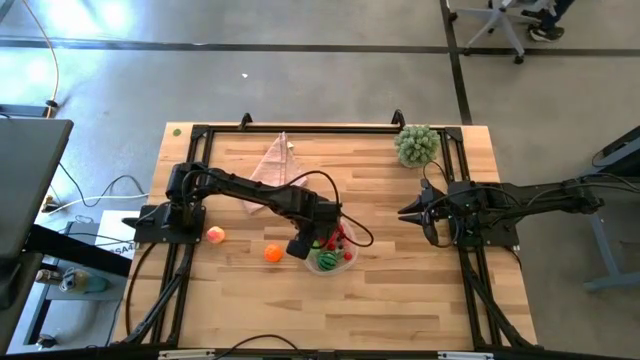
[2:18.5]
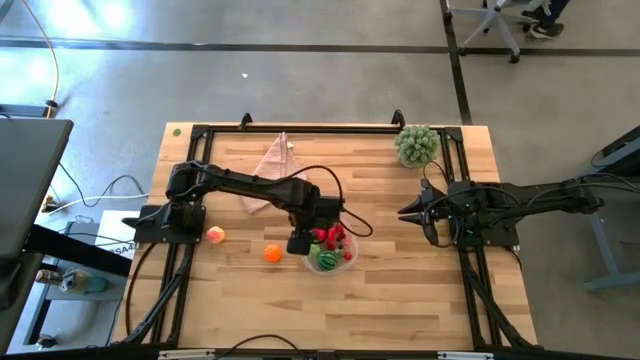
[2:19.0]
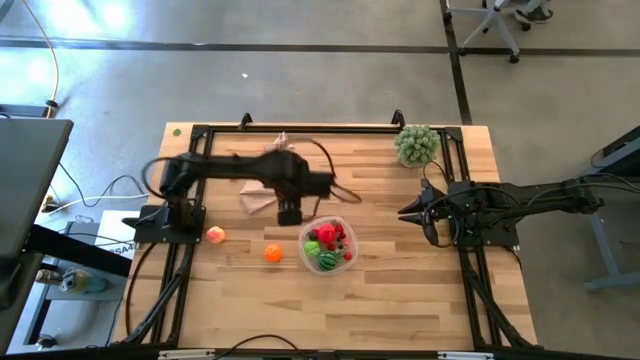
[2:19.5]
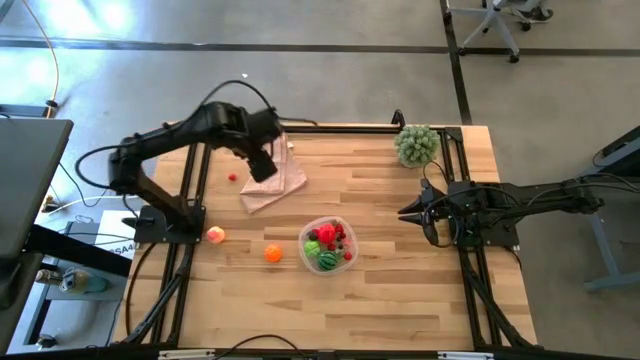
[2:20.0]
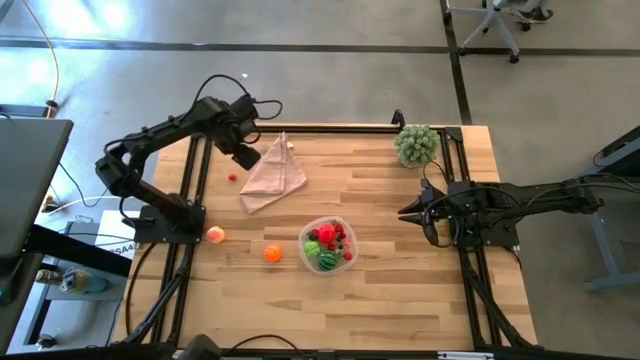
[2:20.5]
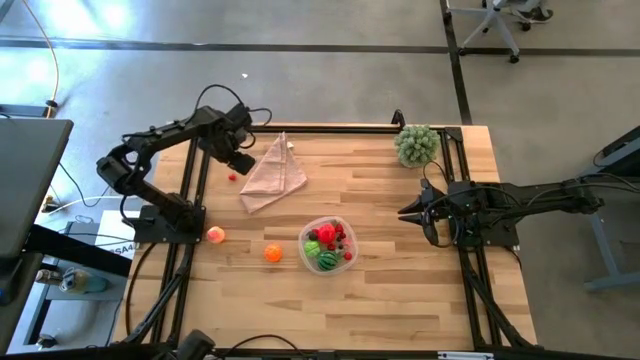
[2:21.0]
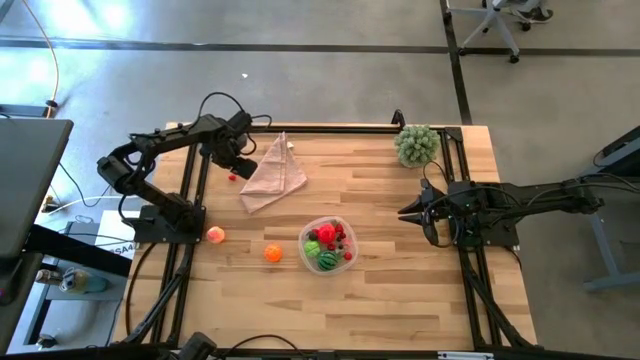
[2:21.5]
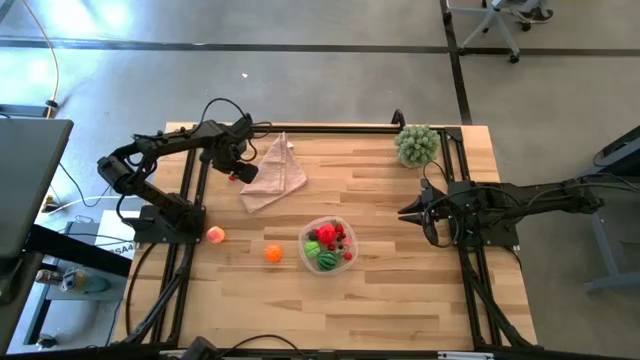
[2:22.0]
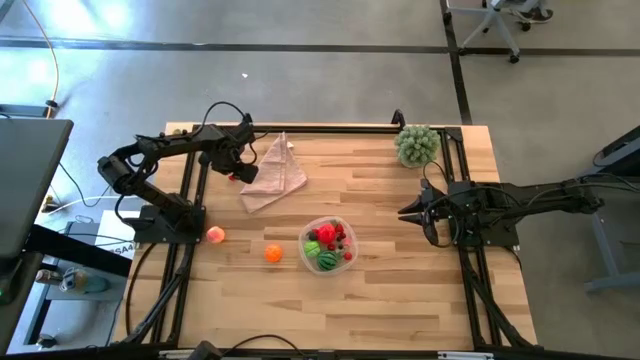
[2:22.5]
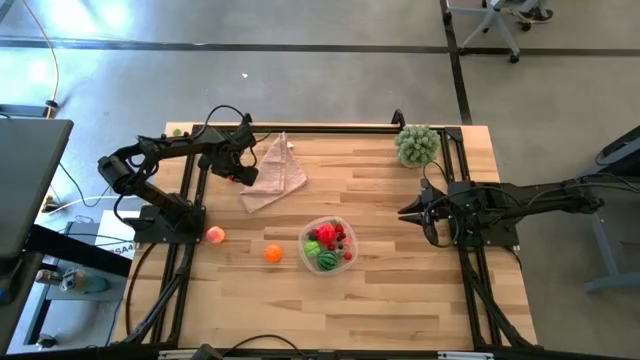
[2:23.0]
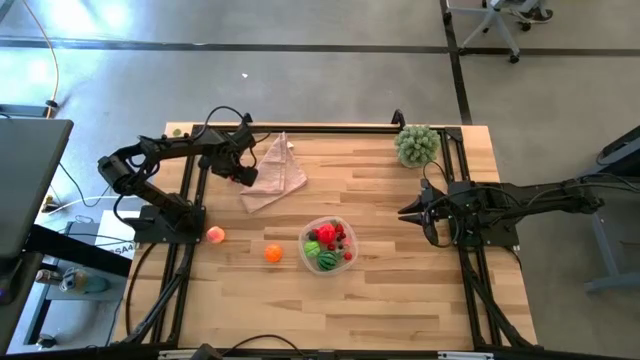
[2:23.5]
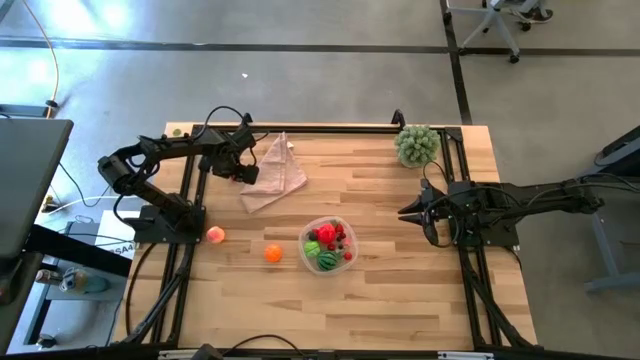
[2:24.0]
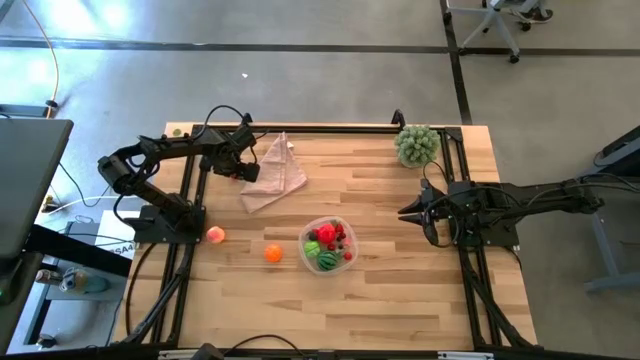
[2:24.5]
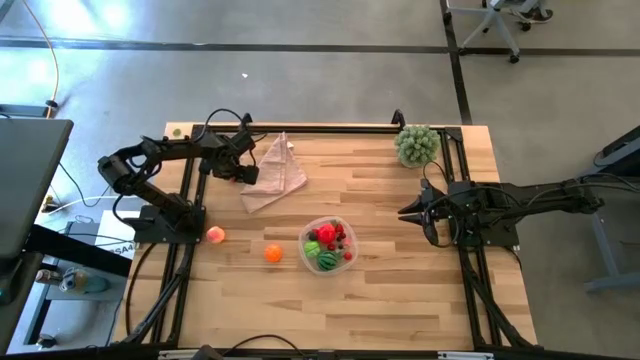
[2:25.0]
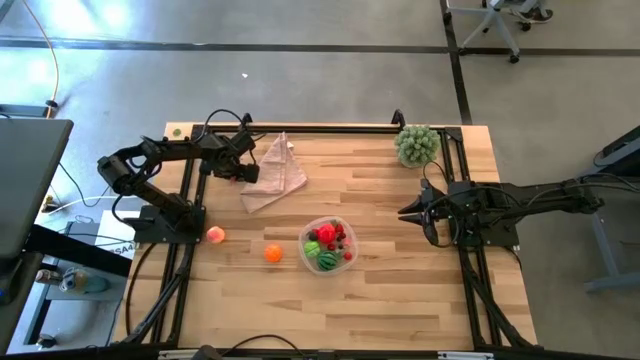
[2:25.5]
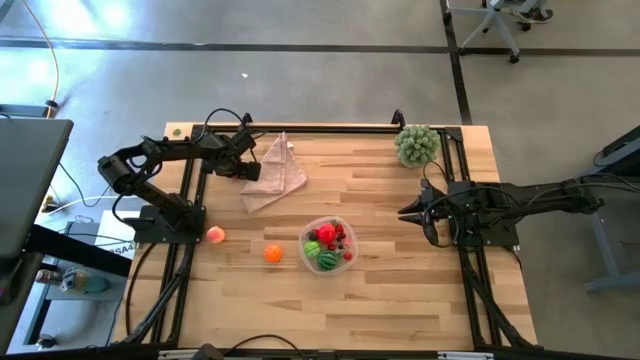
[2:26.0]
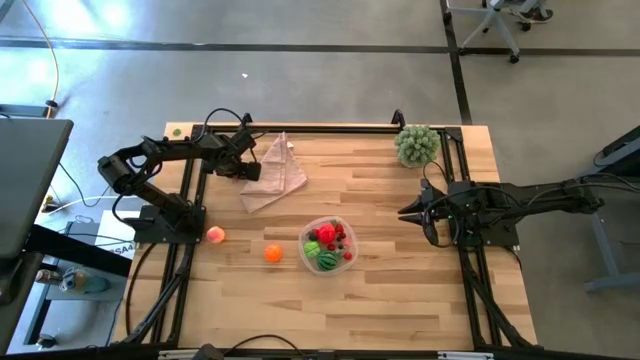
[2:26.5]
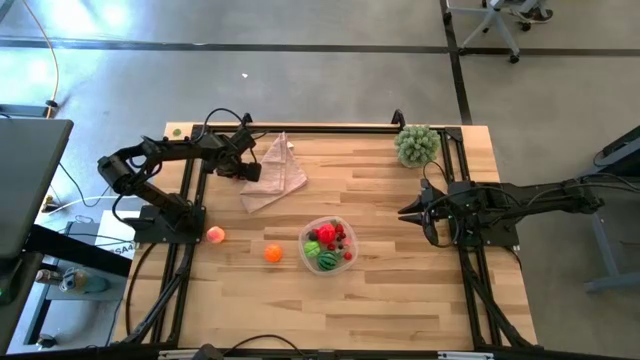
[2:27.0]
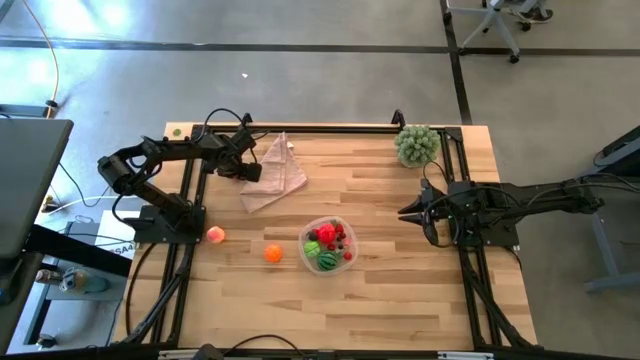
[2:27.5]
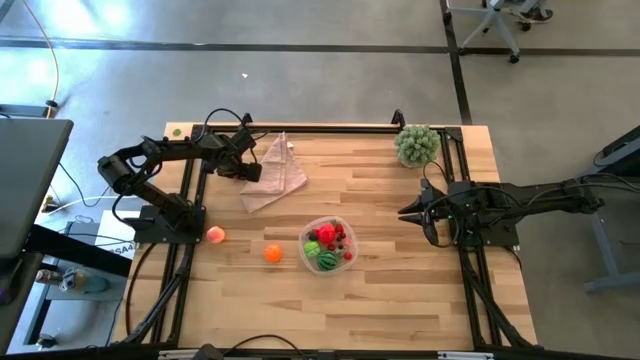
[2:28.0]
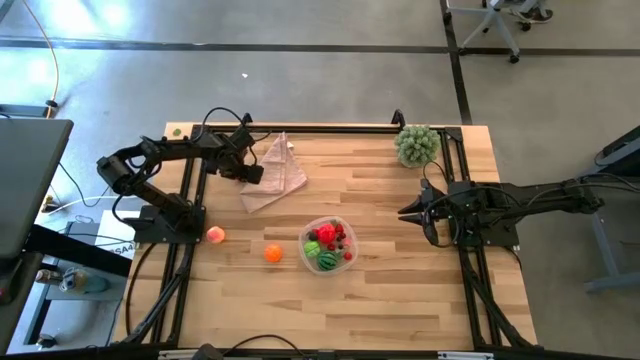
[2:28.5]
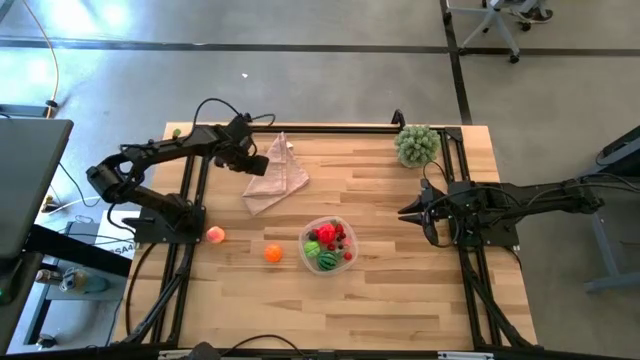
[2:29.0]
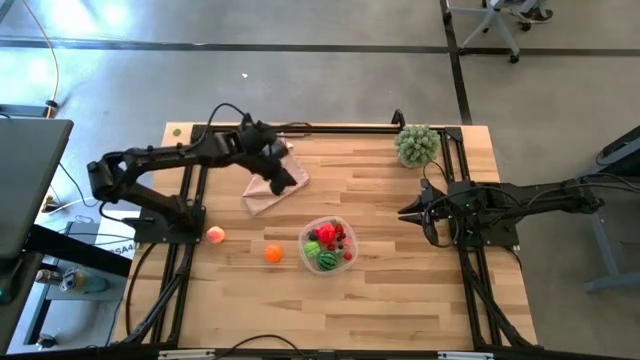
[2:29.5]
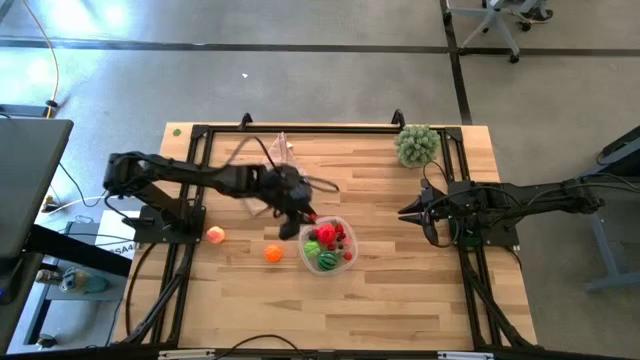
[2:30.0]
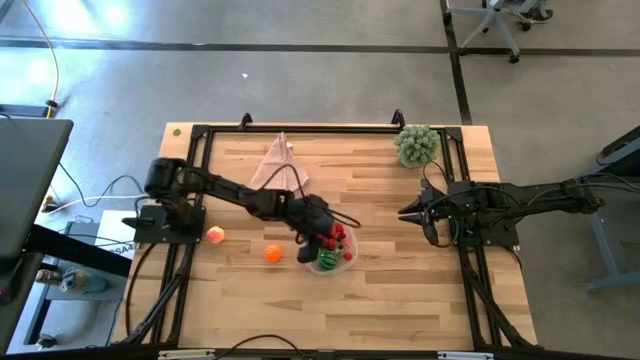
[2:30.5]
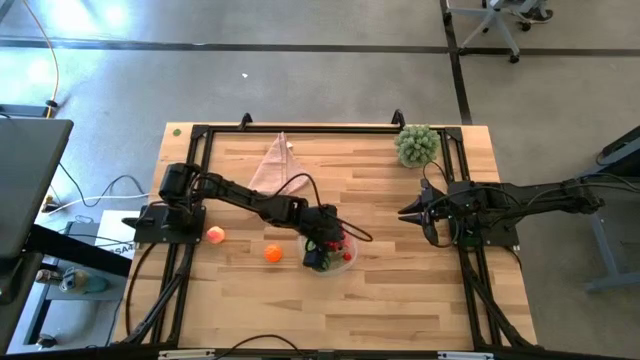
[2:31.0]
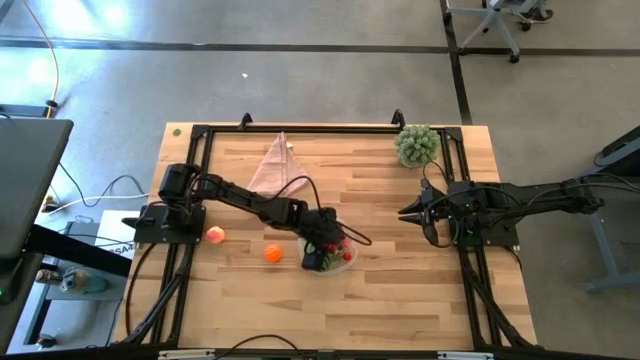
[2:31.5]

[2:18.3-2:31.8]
Task: Pick and placing Produce into tupperware
Put the cherry into the transparent bin

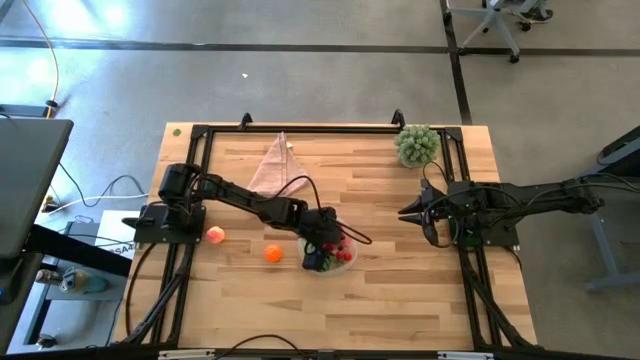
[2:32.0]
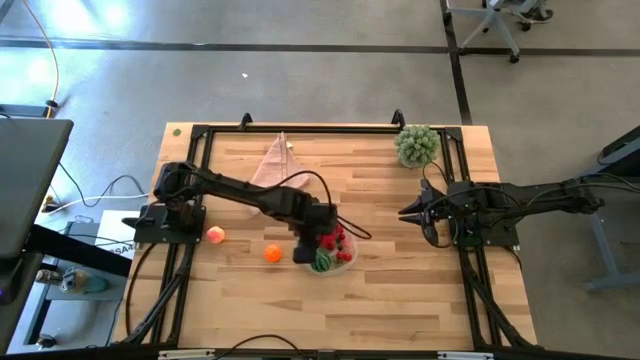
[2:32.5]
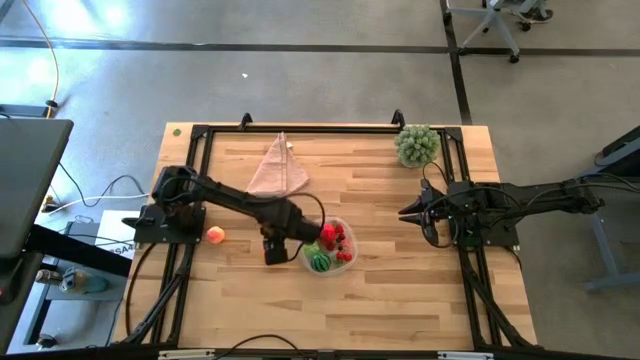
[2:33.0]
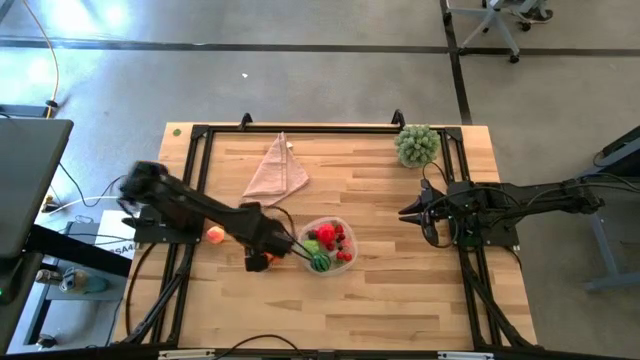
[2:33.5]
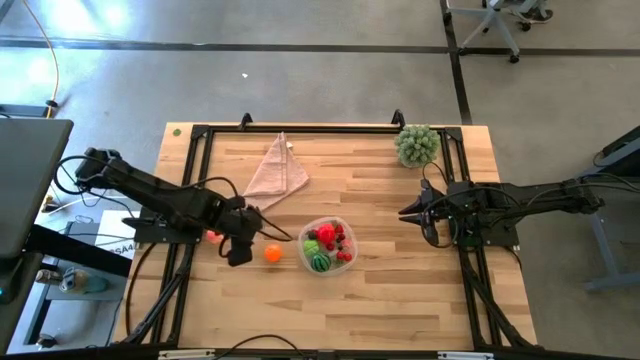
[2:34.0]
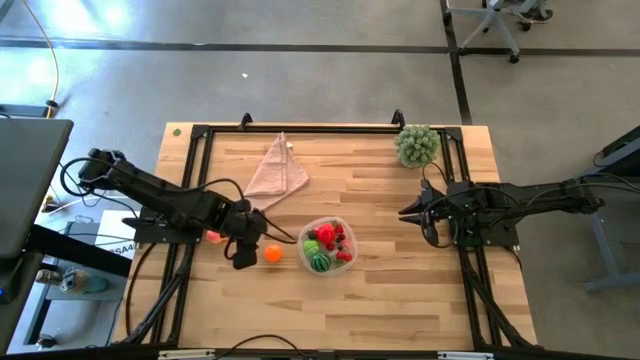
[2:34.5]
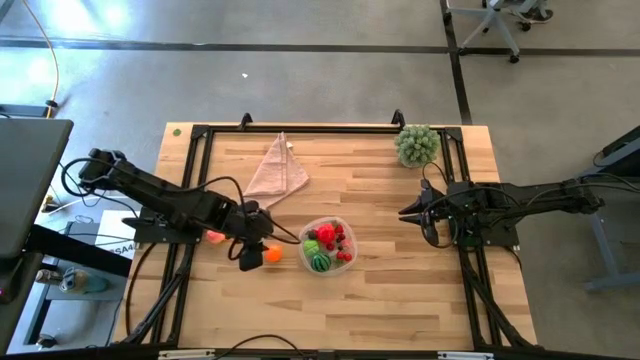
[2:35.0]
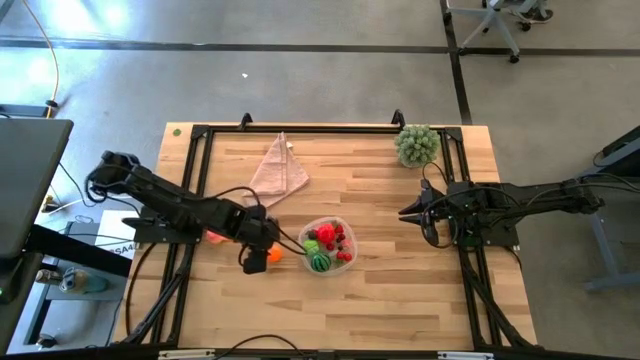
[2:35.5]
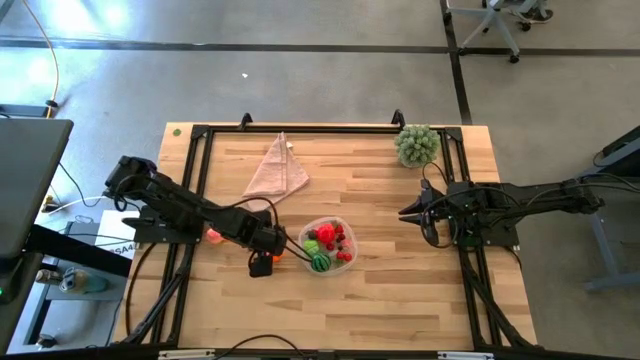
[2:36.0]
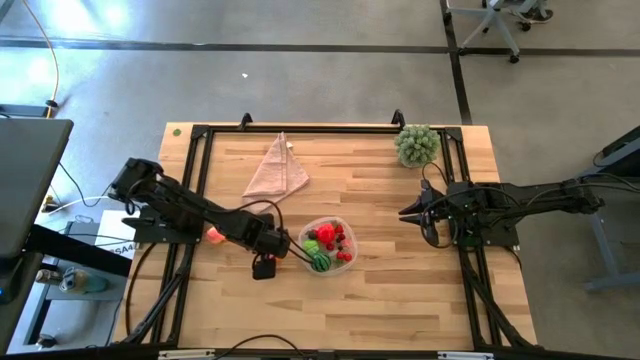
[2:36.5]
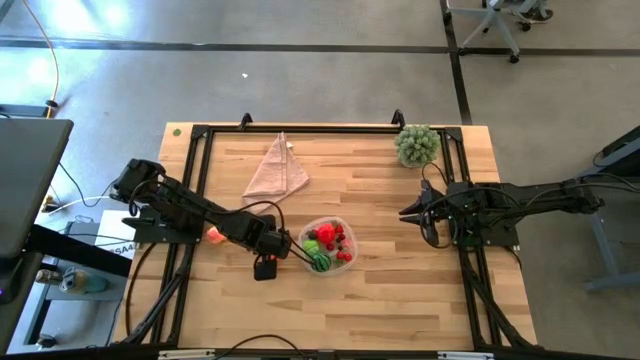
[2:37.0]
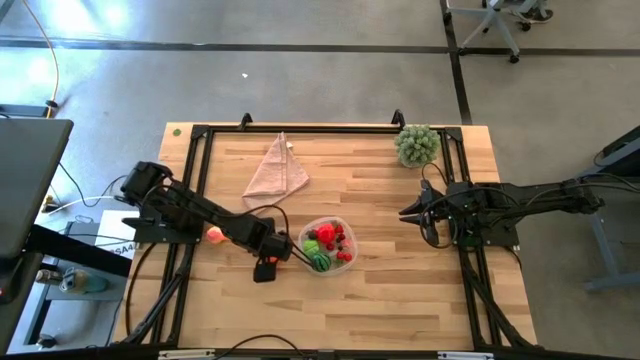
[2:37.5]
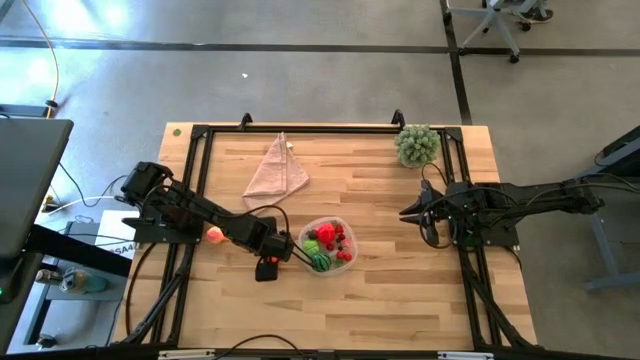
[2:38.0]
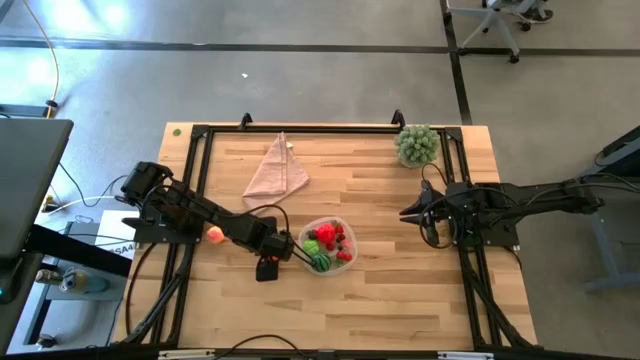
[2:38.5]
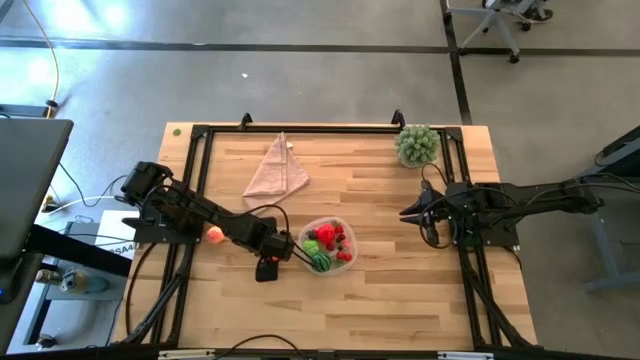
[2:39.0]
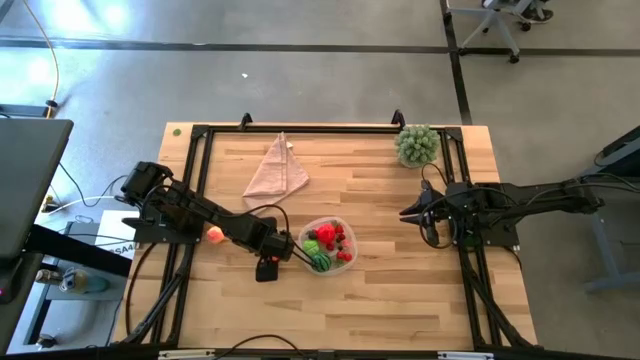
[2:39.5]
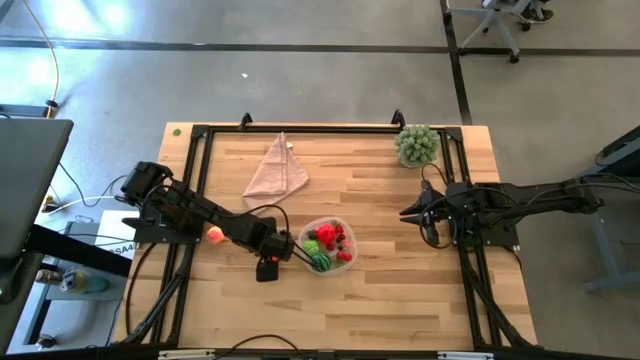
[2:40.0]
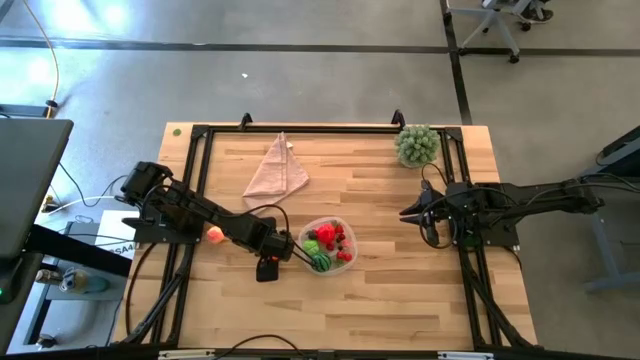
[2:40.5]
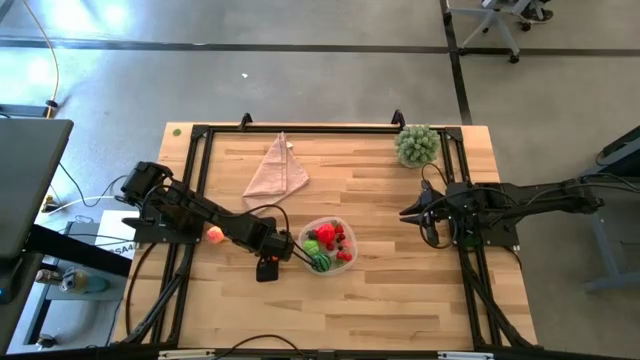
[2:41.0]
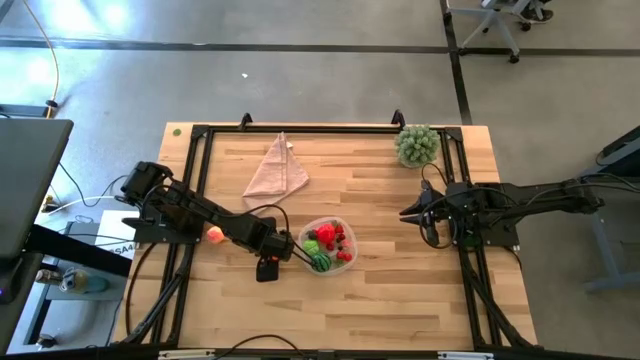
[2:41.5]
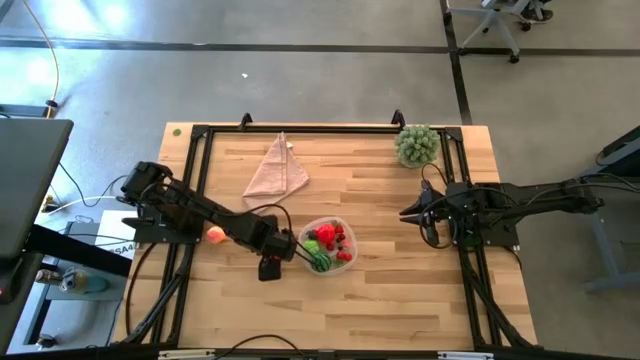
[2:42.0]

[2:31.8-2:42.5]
Put the pumpkin into the transparent bin
